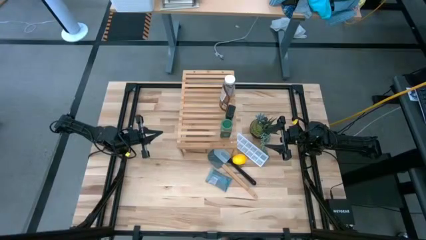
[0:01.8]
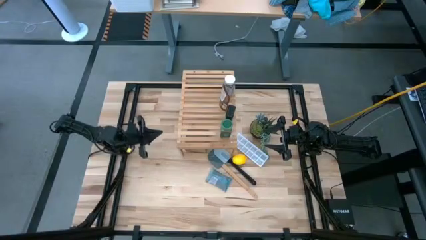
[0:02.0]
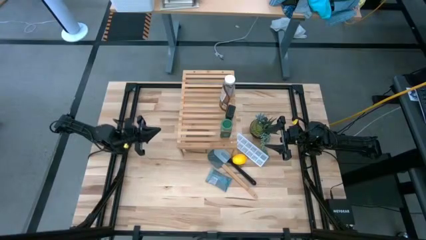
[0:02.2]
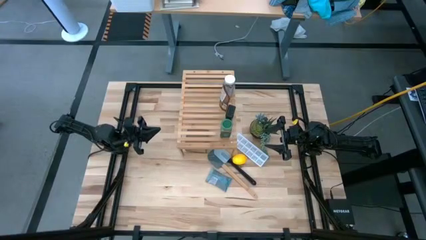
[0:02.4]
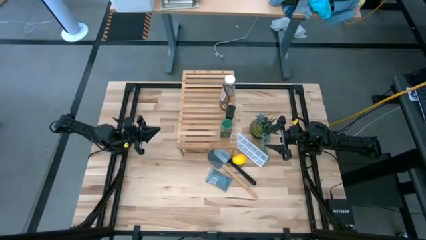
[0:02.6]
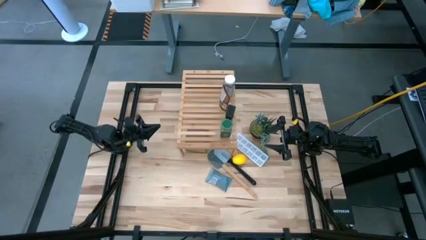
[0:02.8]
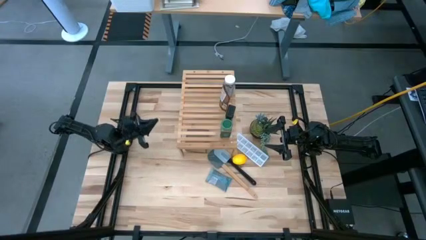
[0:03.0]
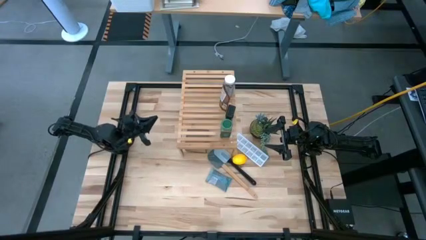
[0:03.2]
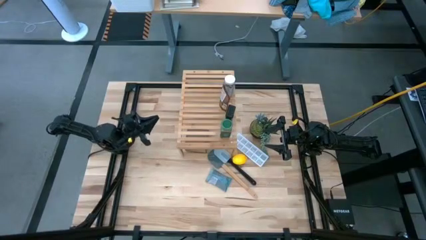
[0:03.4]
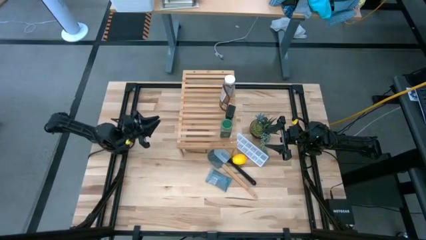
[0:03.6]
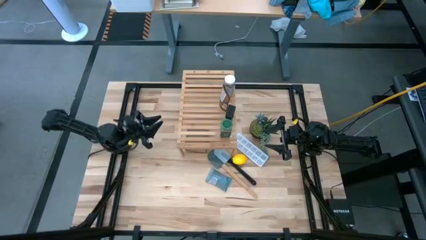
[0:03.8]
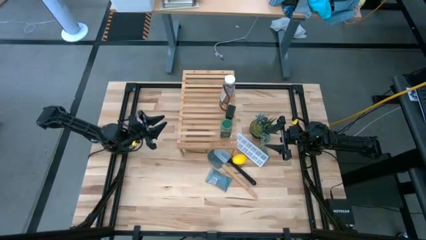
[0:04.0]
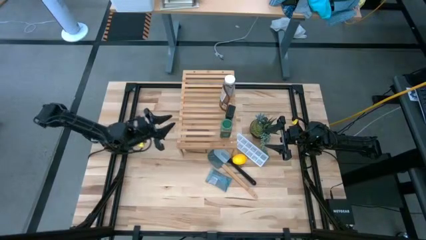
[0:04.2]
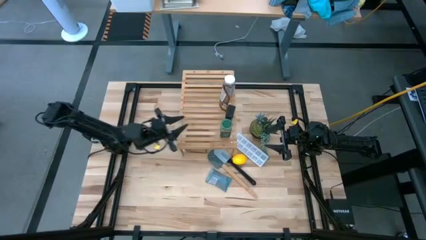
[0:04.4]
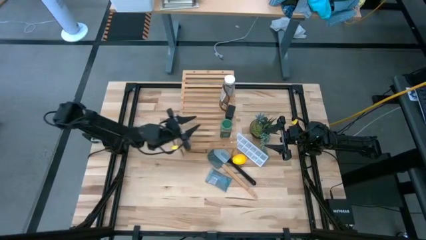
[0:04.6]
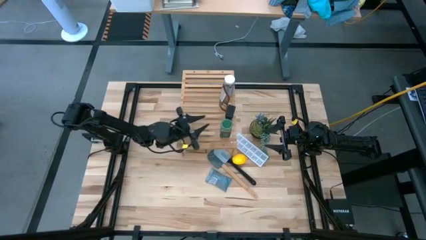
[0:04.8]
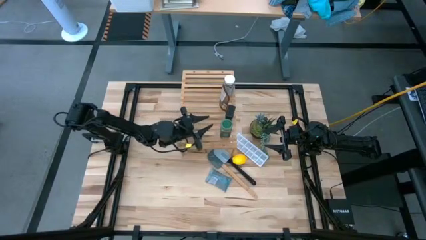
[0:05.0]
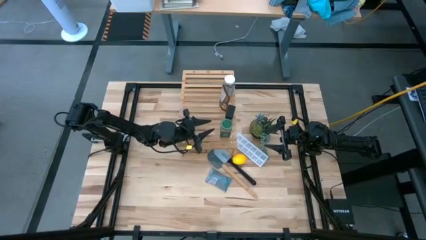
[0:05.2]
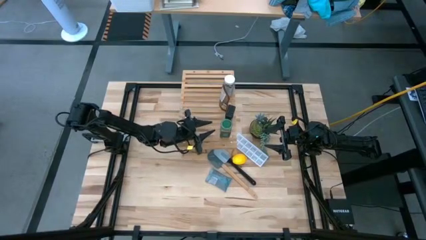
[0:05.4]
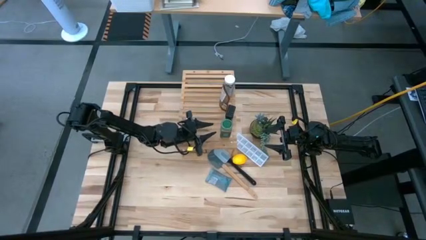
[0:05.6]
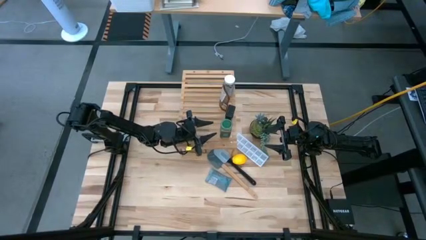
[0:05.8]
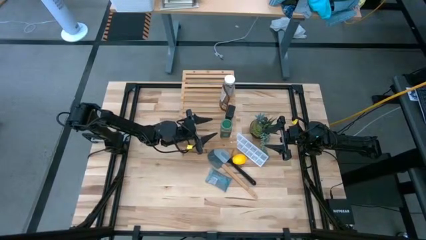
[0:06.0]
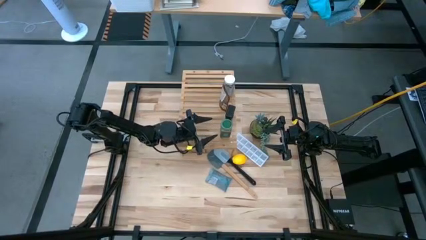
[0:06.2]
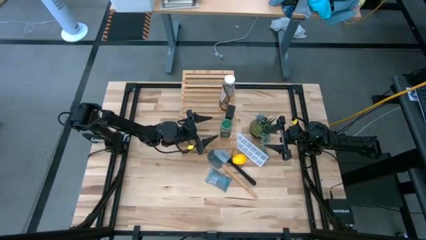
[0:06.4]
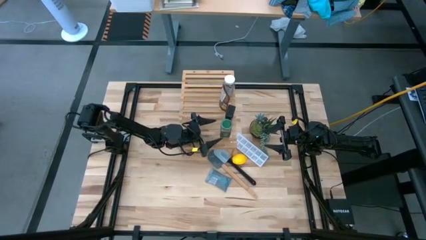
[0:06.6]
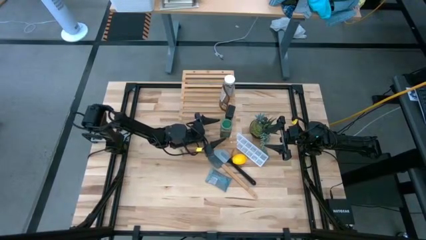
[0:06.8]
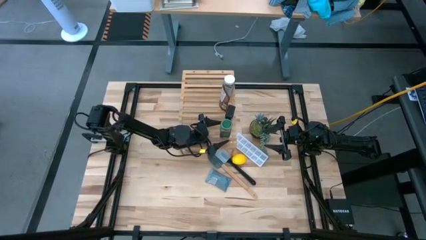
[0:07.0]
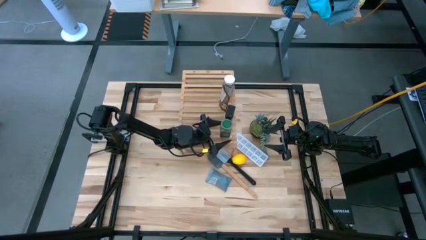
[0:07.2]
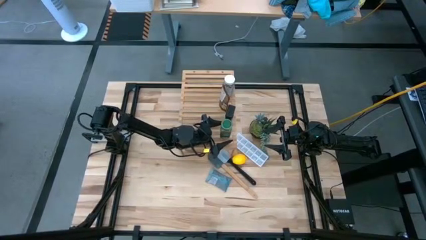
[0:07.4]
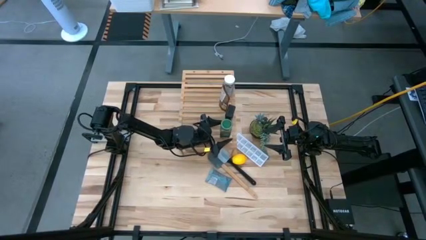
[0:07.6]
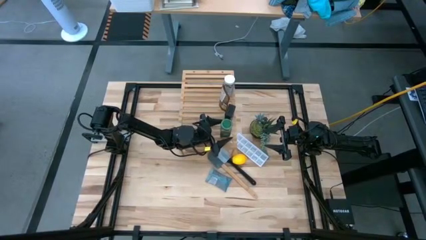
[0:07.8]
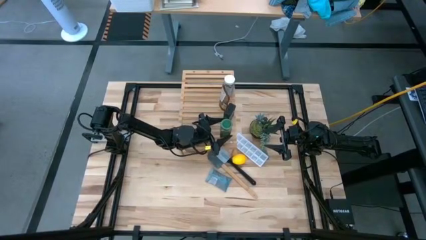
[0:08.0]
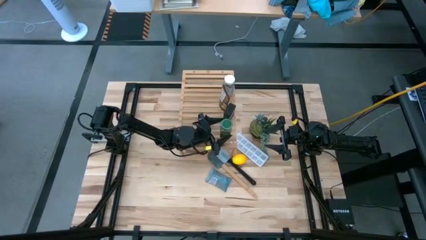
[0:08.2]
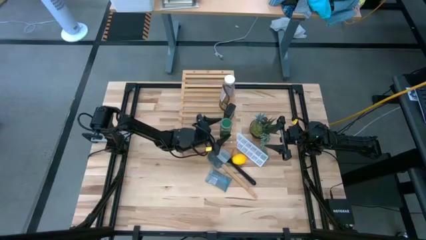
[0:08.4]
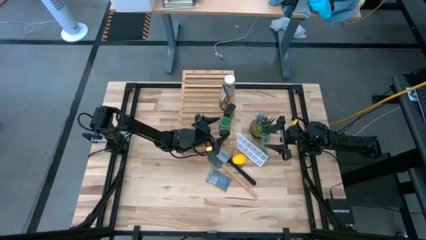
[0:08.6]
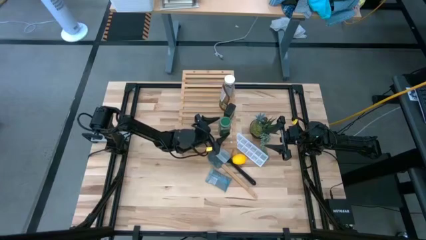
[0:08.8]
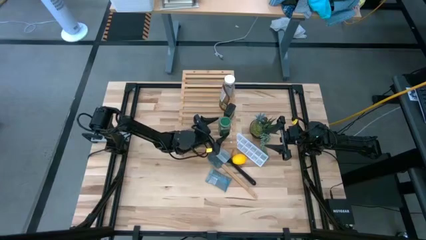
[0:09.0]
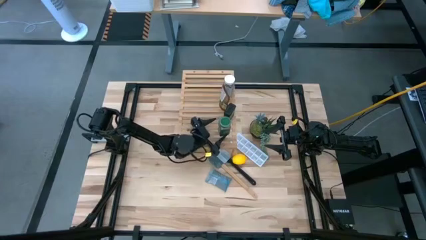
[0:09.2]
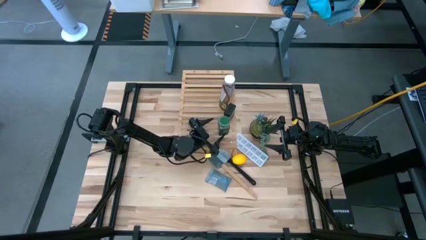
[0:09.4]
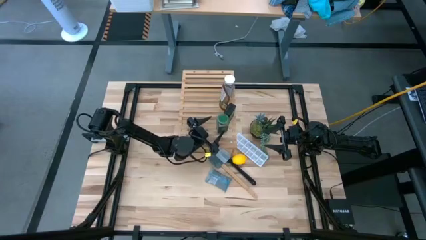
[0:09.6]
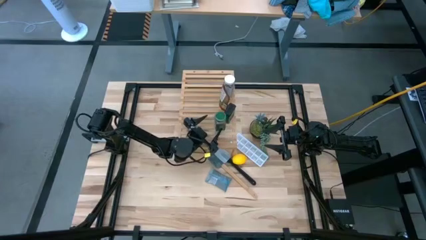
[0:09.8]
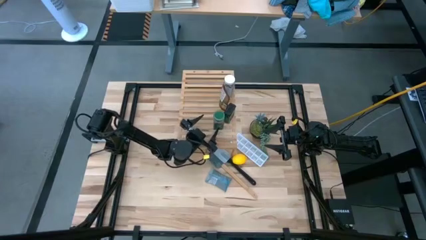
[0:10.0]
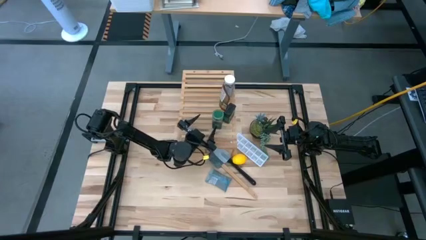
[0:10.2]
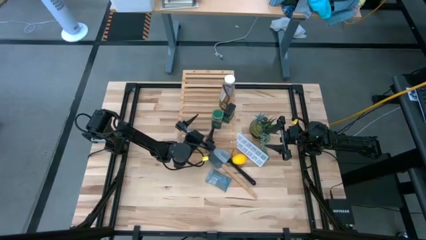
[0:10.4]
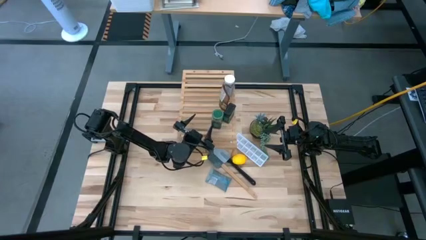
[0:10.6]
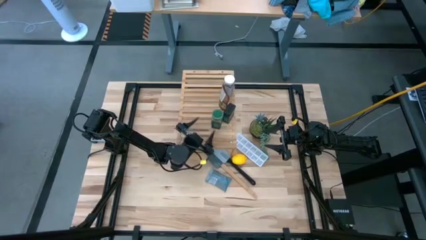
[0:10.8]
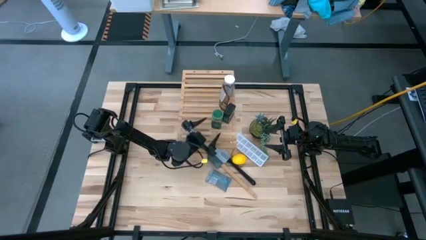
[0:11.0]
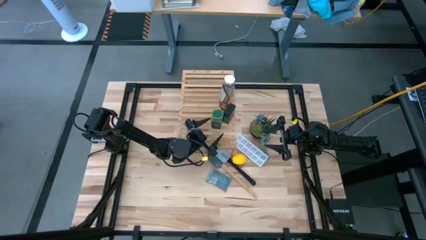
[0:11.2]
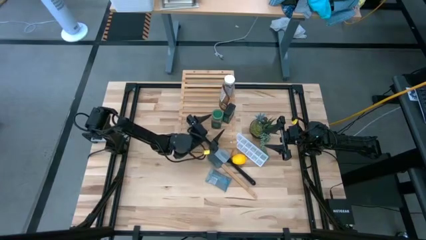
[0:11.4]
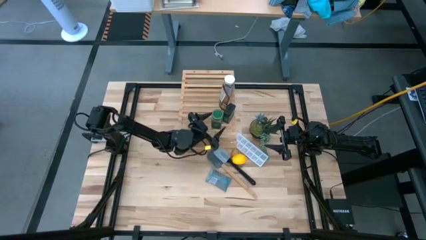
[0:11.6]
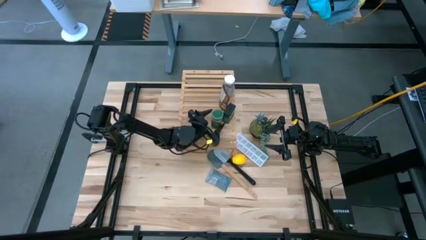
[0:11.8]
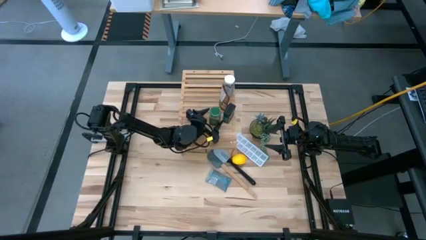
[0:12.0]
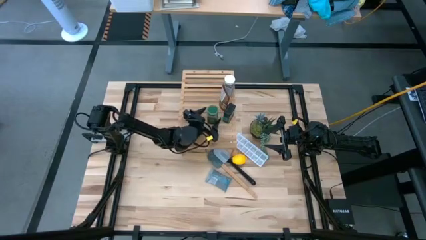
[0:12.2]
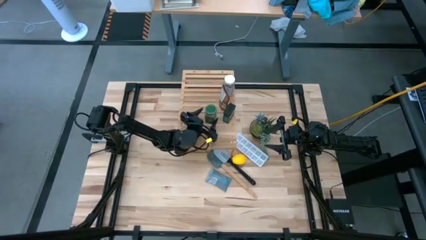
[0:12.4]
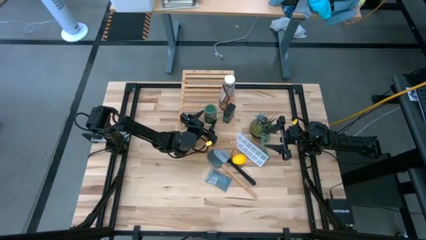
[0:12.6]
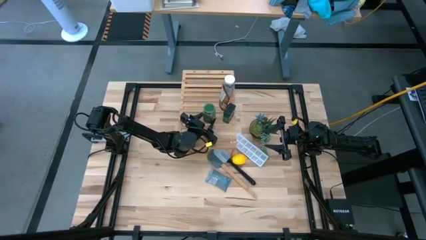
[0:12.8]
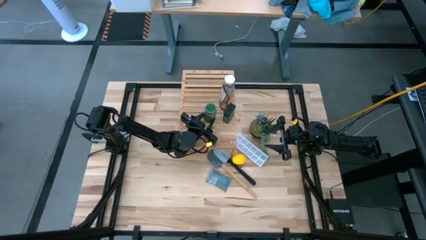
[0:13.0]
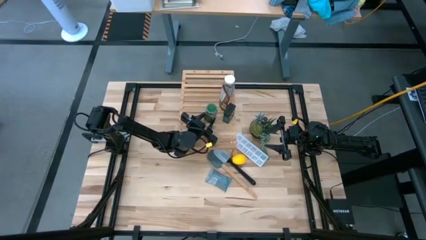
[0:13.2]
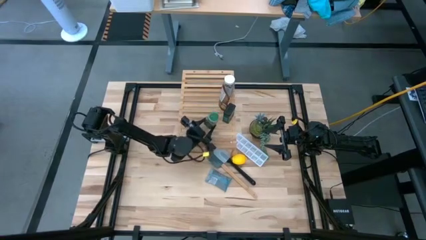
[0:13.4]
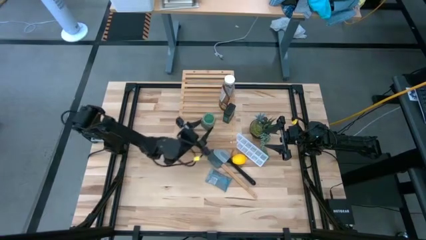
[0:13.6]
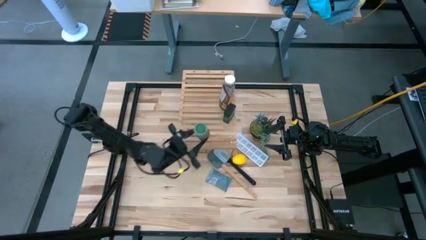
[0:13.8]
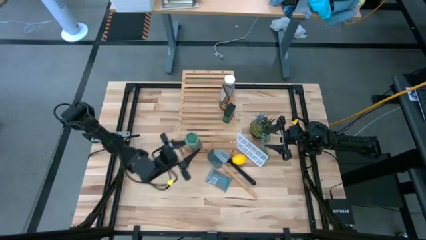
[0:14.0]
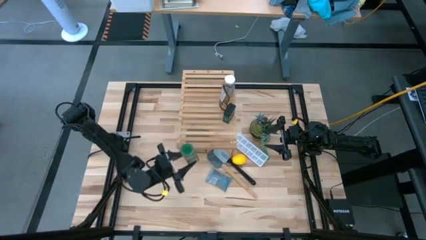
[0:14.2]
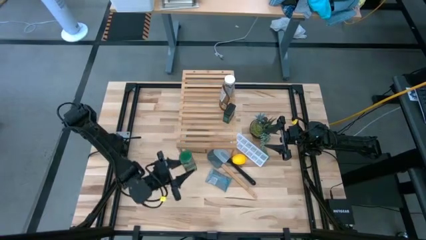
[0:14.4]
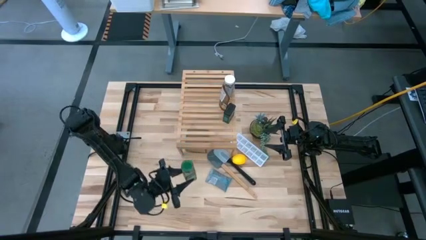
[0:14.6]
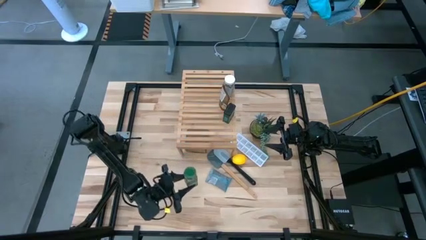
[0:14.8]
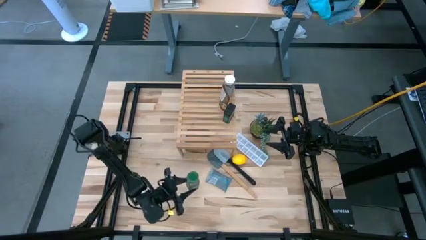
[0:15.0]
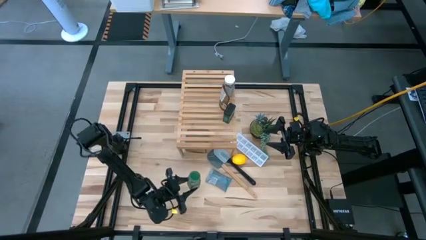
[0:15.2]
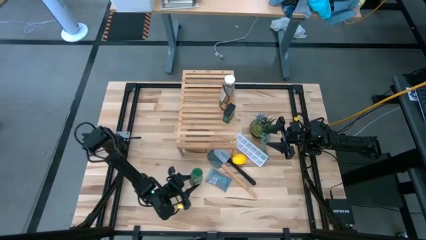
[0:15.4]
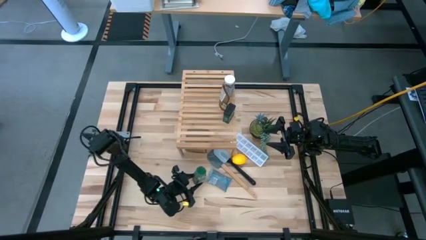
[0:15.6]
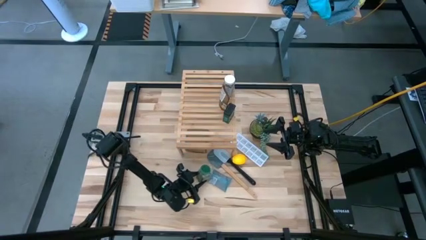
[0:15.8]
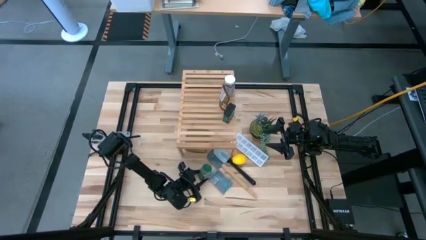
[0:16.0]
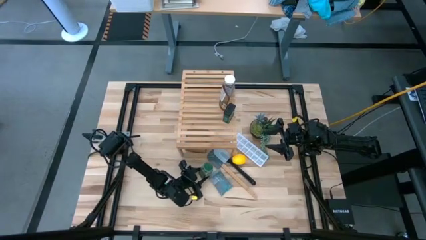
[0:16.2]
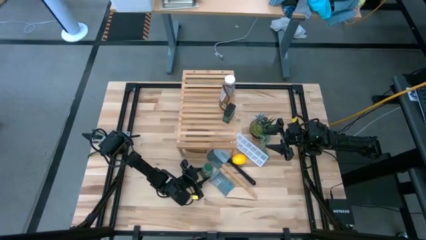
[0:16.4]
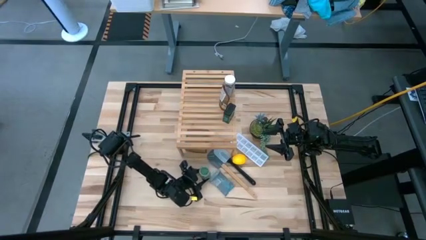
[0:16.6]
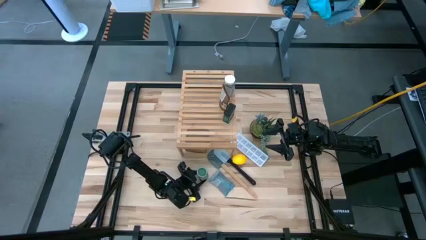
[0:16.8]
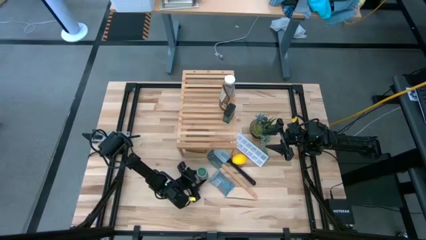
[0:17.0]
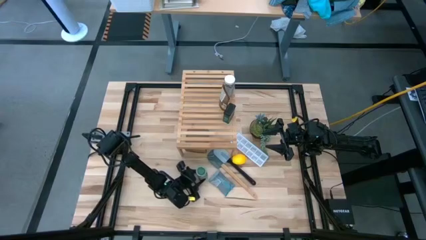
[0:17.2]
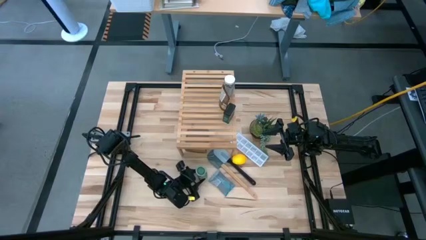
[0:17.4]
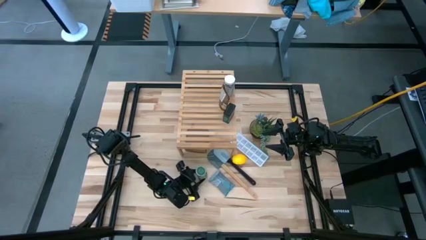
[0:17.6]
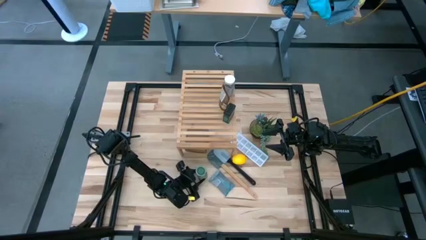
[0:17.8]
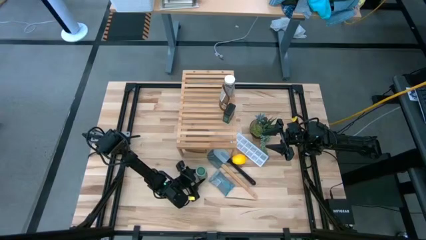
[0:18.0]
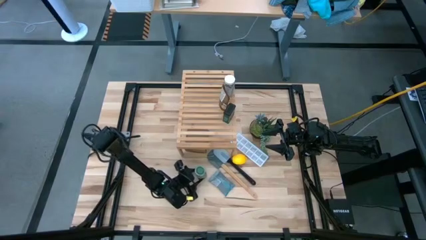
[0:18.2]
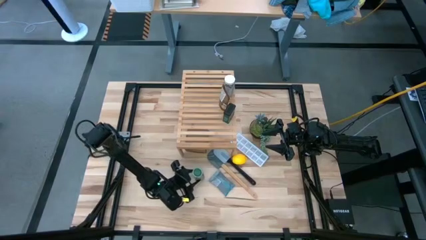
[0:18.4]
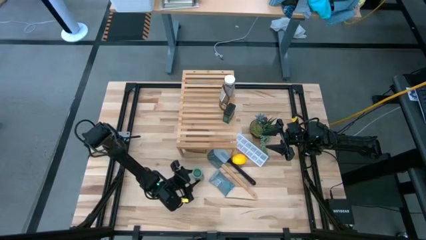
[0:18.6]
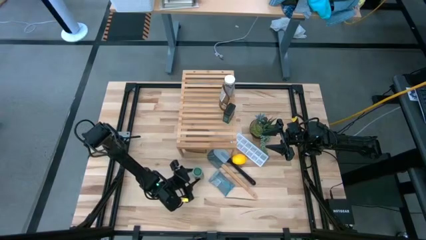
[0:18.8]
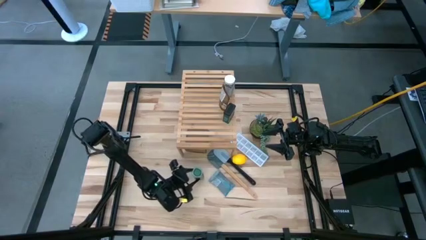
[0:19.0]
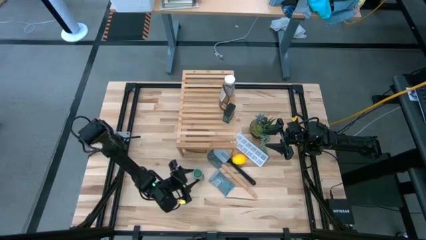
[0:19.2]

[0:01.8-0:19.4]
Task: Shelf spices
Remove the green seasoning bottle from the shelf
